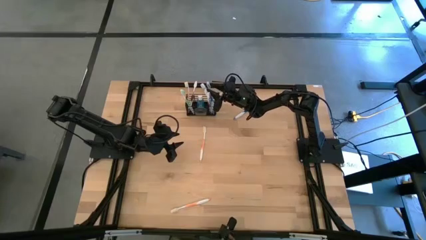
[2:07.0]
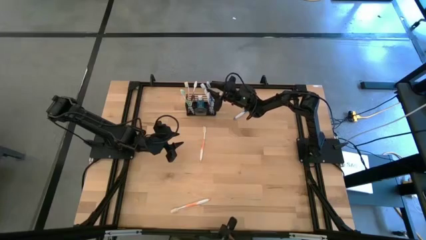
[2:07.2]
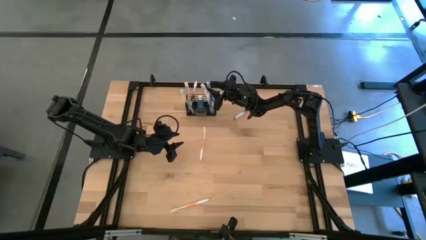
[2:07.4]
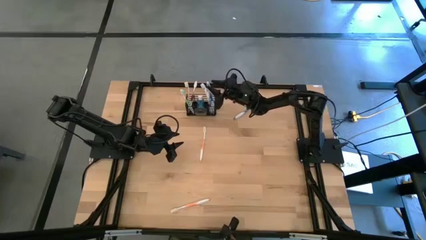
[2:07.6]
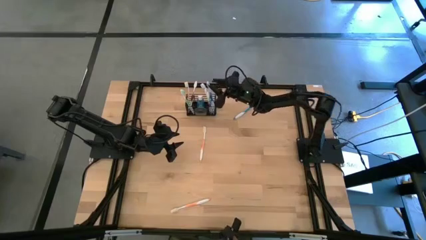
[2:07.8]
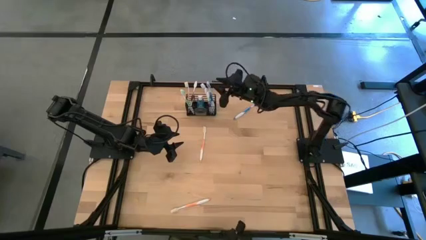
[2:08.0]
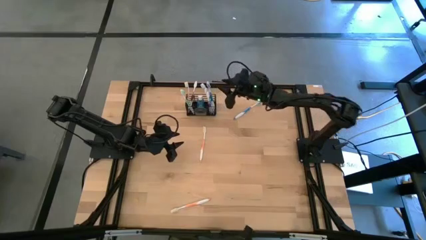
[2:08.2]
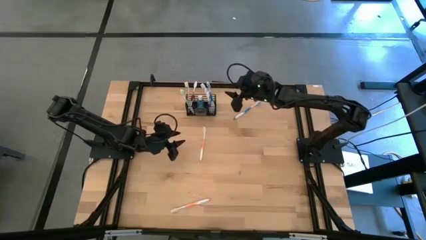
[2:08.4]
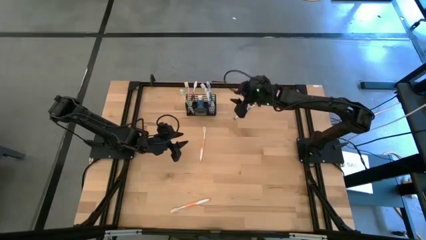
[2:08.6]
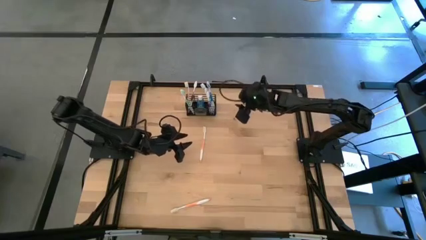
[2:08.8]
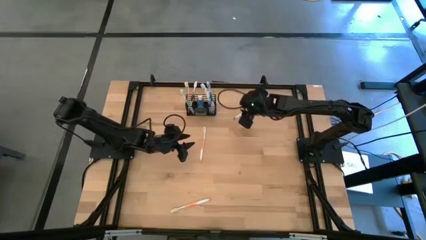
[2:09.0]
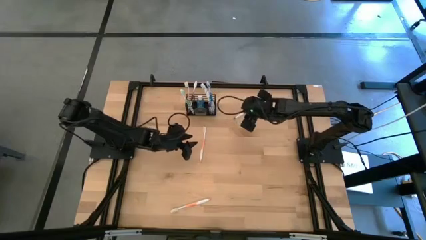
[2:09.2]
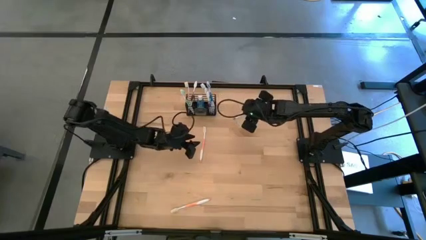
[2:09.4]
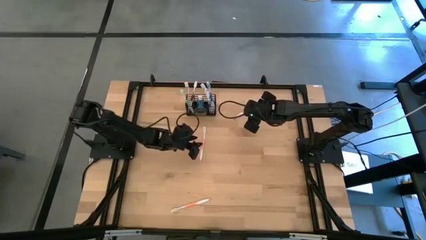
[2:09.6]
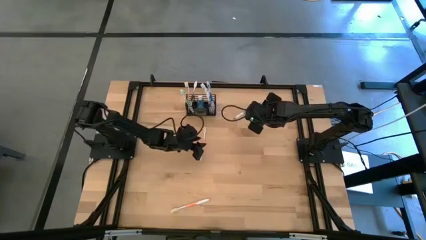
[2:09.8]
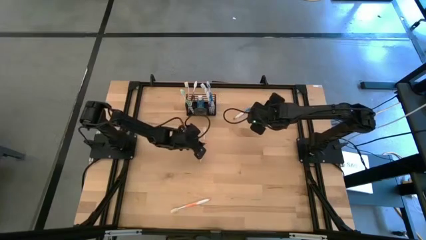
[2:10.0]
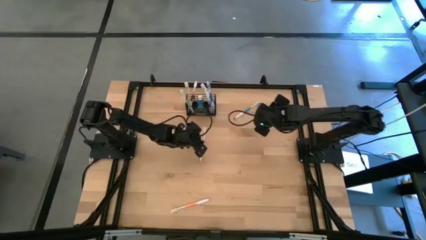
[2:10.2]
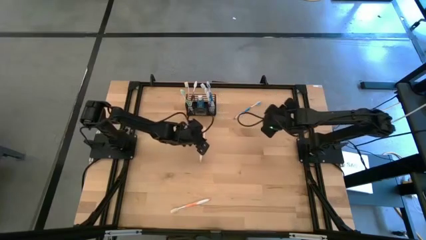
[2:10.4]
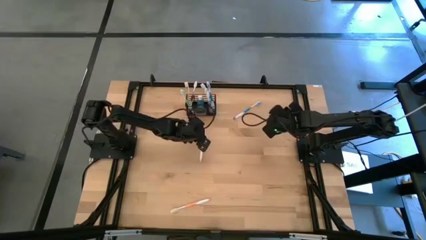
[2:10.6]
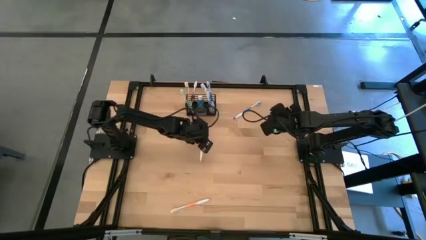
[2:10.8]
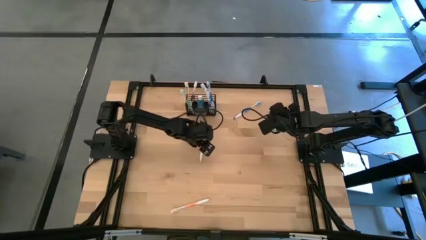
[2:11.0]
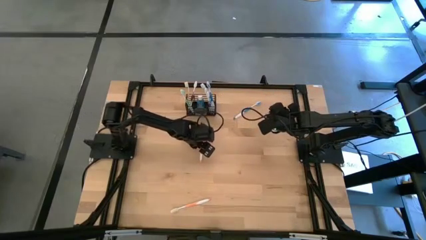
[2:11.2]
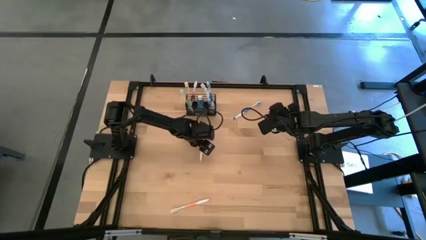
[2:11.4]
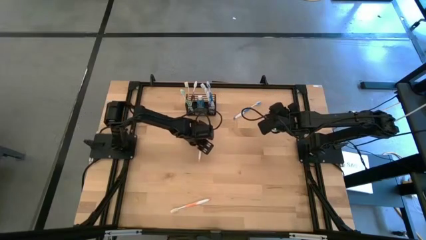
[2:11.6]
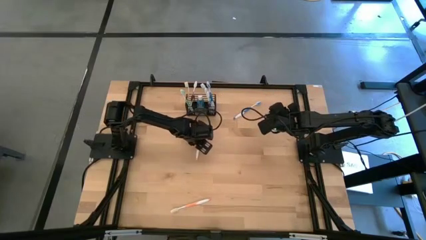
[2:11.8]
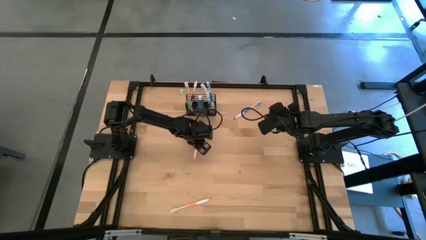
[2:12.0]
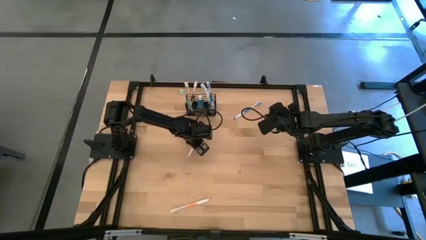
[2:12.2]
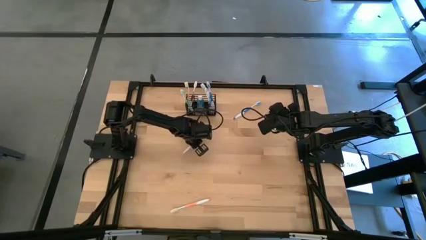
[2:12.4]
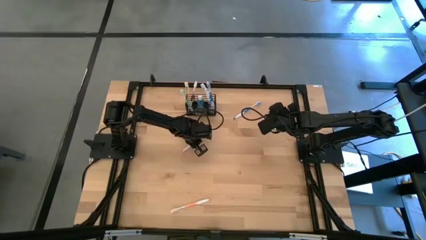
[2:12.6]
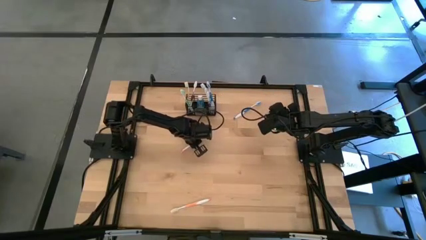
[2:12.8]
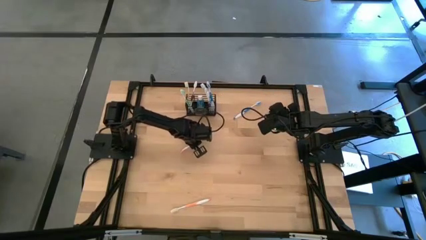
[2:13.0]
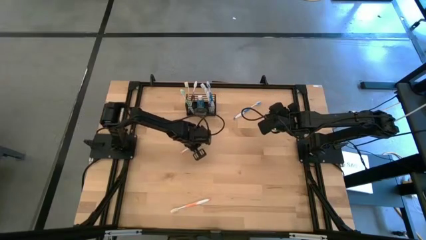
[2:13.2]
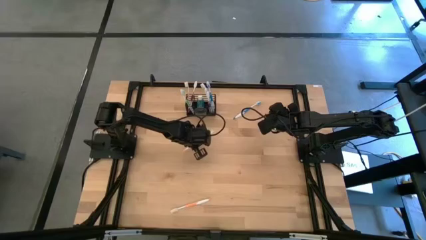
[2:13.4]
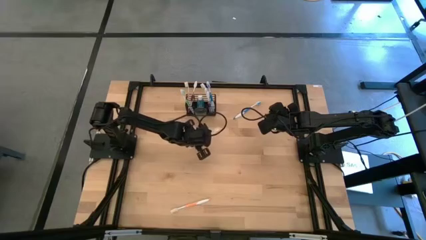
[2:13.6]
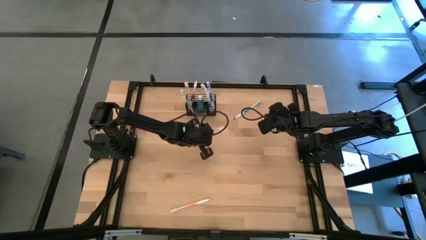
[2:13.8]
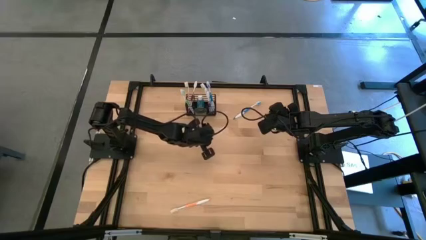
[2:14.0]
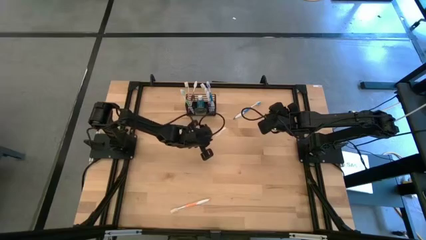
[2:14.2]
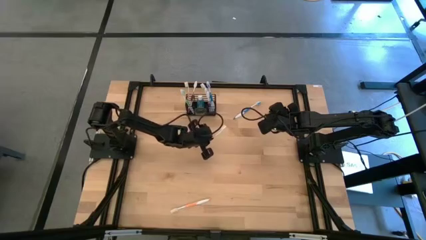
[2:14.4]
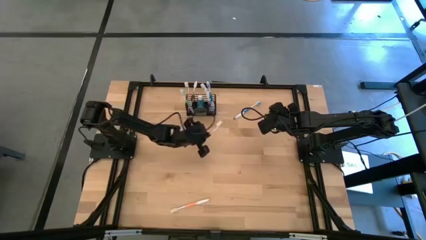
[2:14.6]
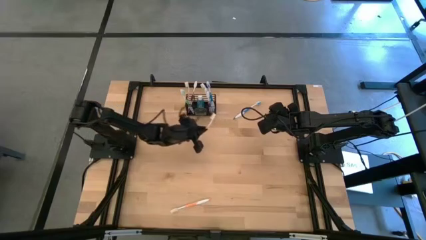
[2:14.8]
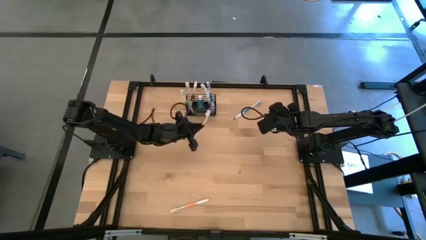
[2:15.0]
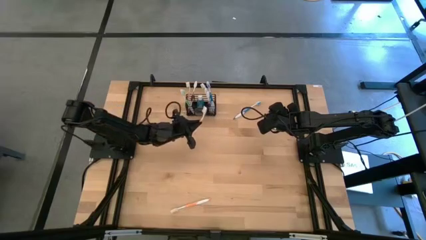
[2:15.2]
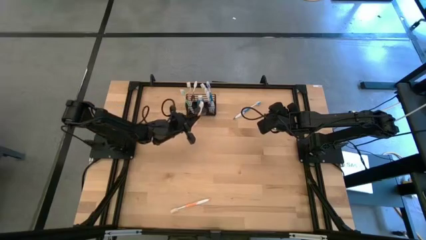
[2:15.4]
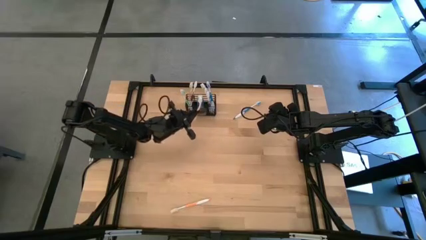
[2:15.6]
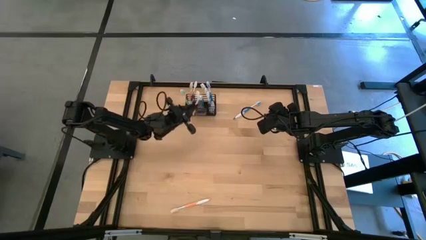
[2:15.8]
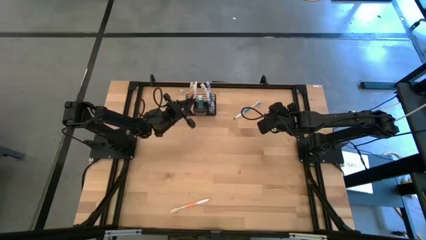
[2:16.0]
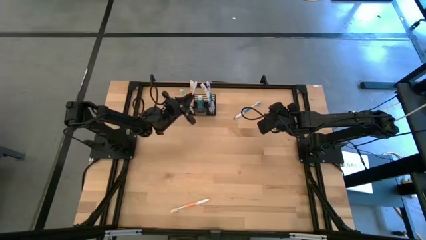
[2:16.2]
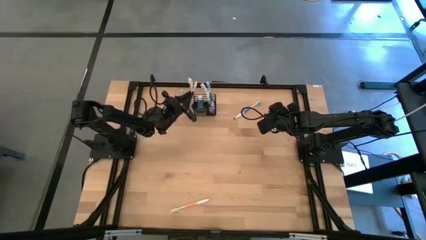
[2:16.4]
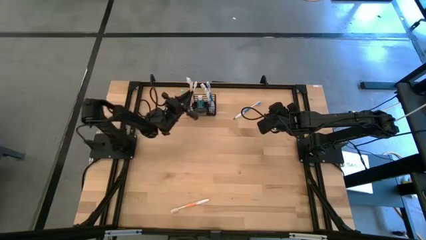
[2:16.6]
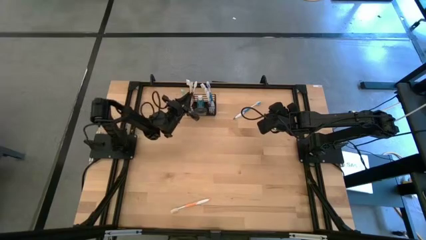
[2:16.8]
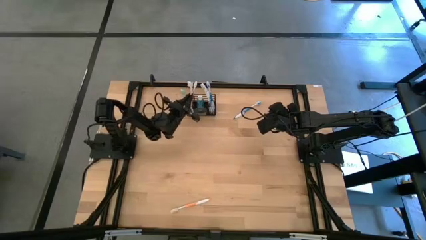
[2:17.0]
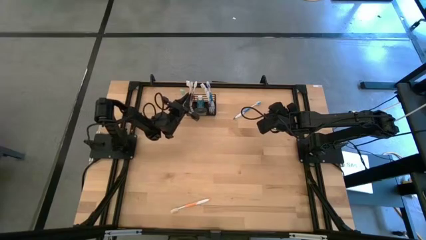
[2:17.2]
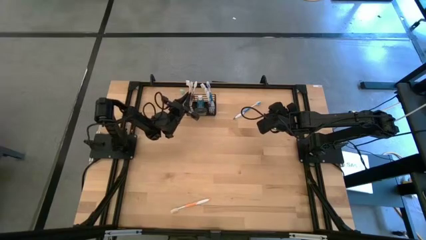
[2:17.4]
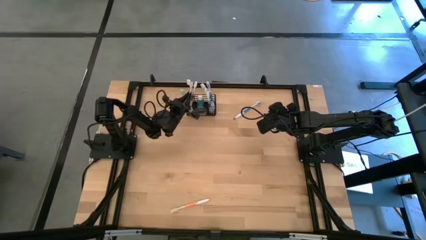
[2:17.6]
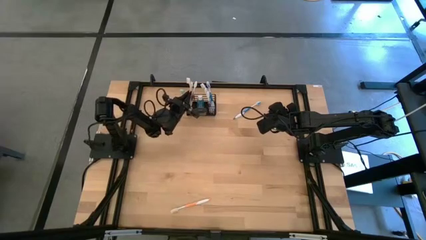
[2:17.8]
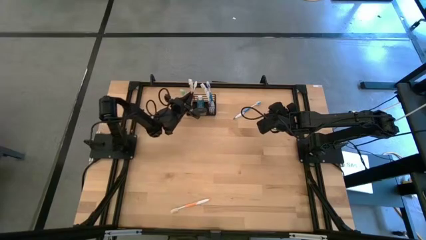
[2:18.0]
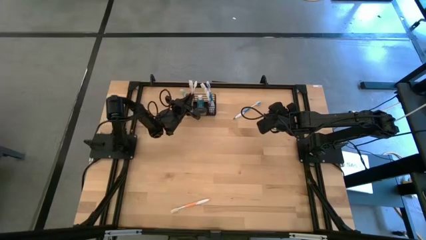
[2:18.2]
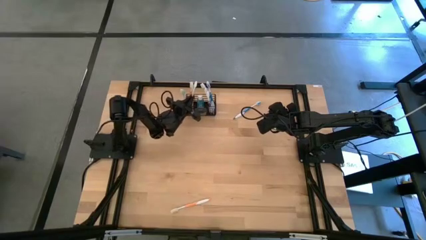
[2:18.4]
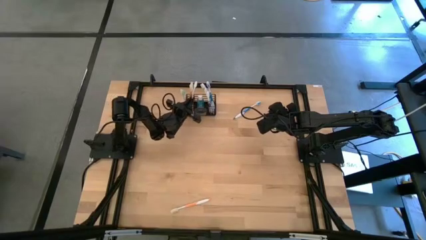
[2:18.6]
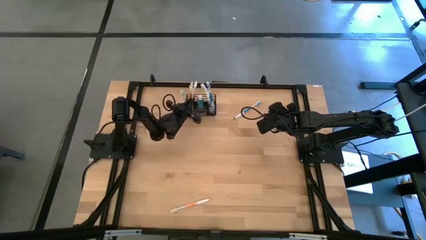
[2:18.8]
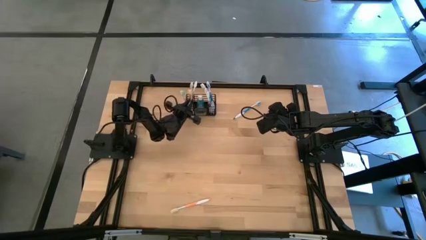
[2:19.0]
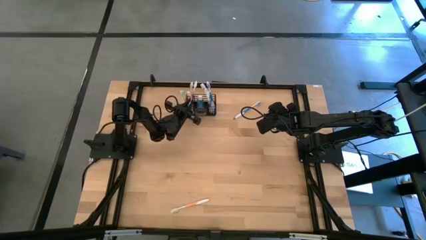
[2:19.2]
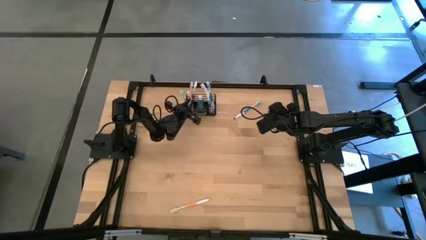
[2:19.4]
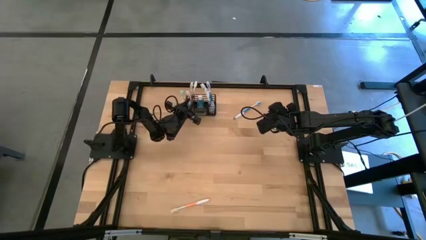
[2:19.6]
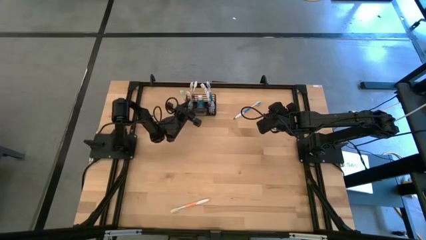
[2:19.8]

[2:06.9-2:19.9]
Task: Pick & Place toothbrushing station
Put the top orange toothbrush into the black wire organizer
